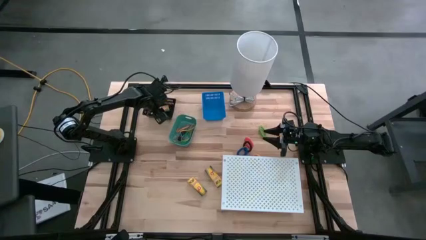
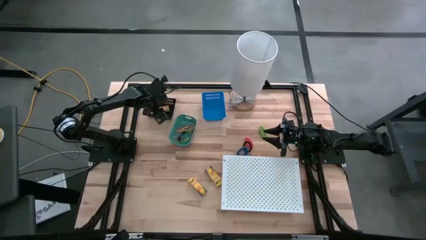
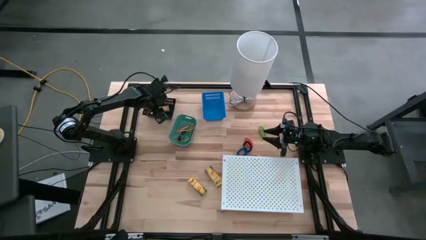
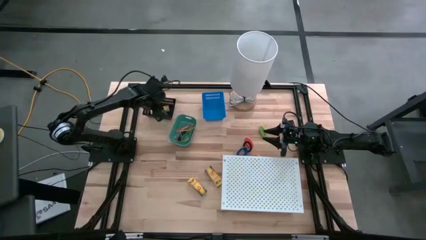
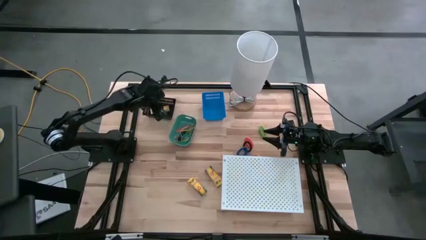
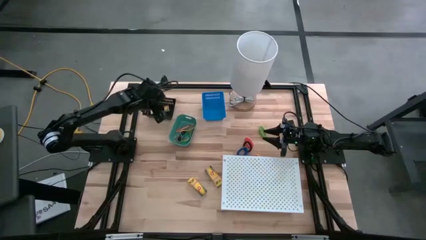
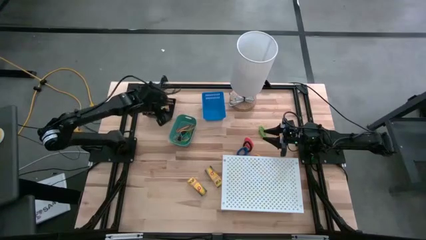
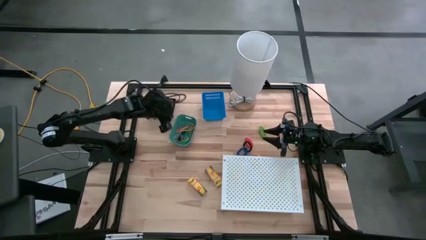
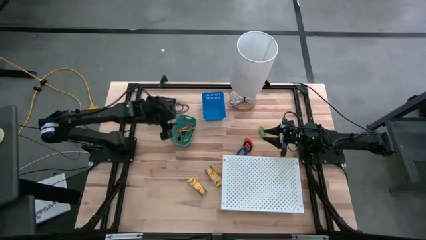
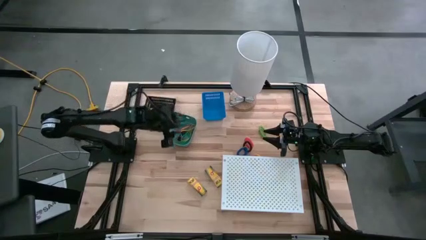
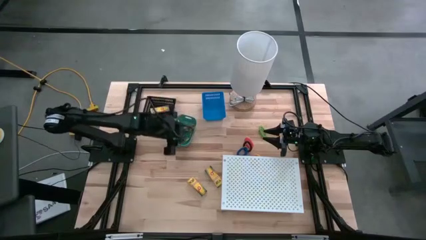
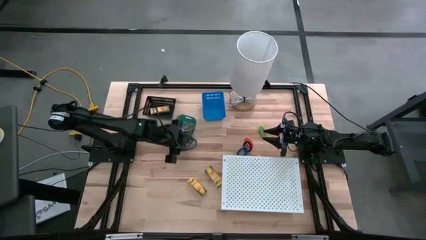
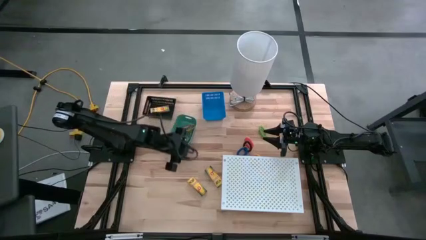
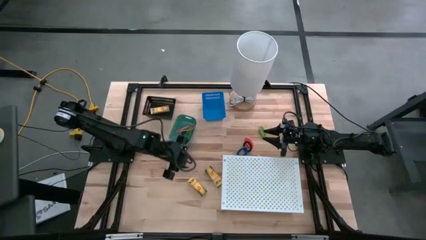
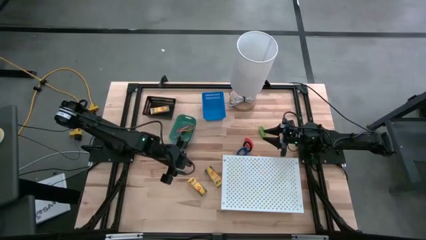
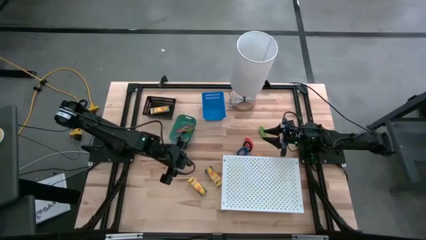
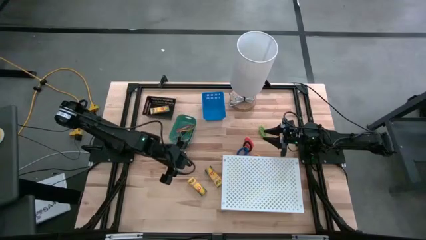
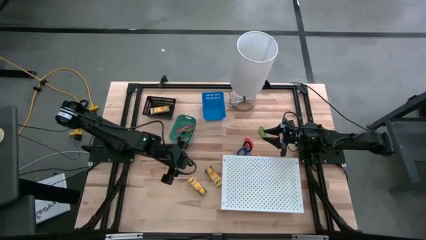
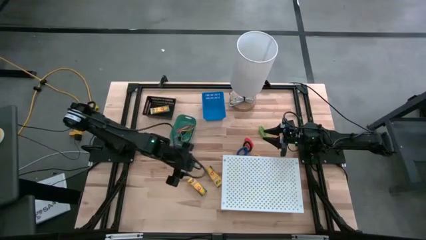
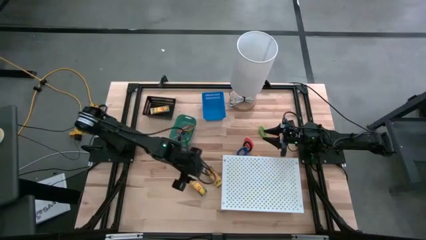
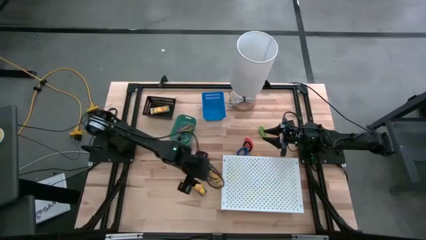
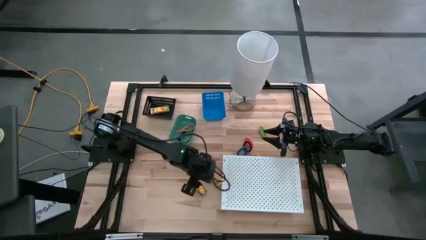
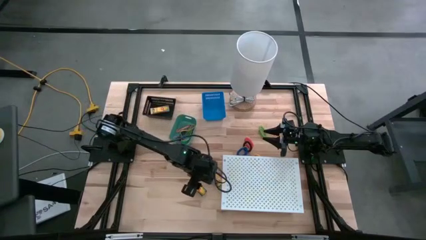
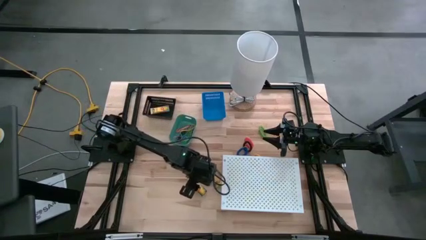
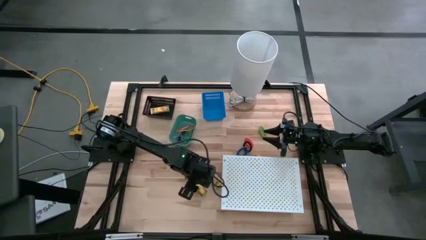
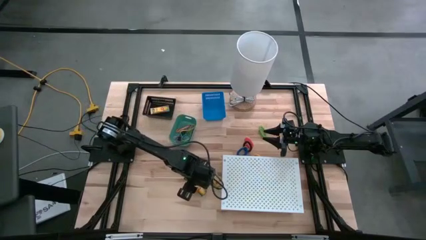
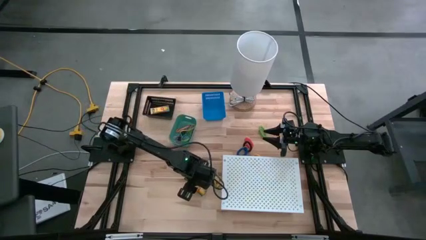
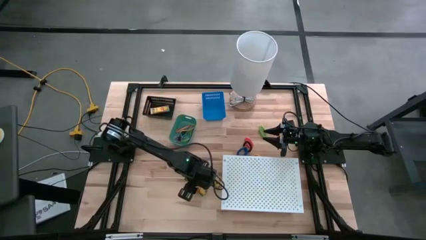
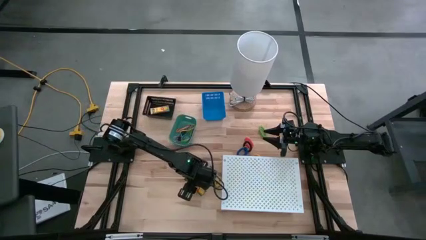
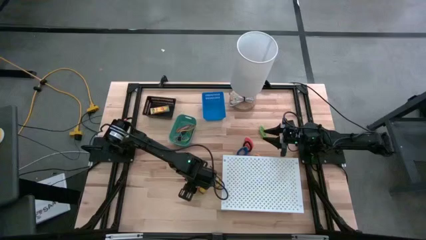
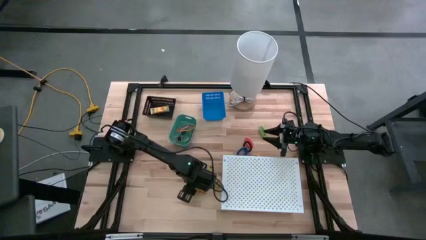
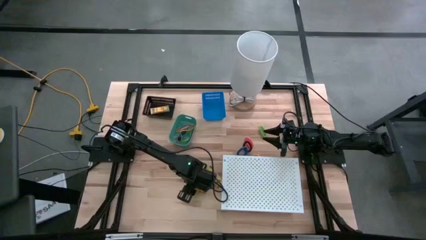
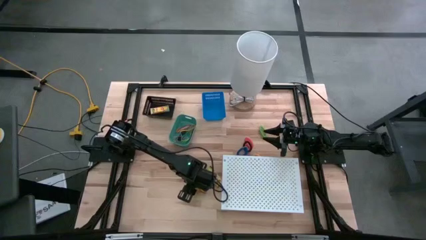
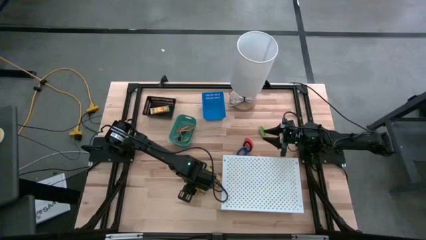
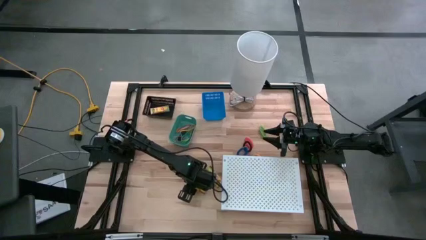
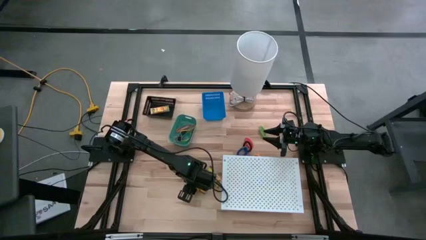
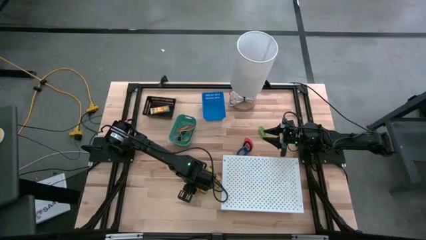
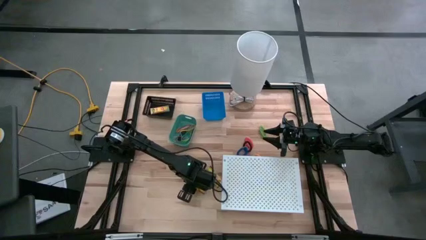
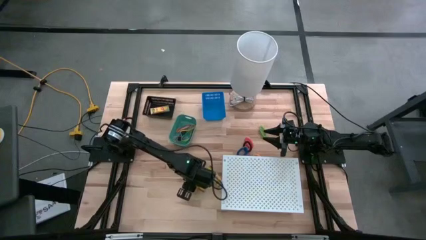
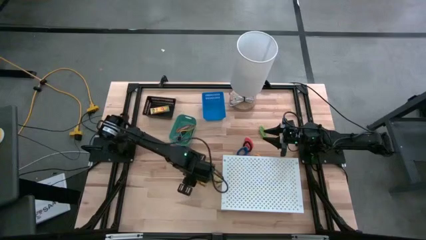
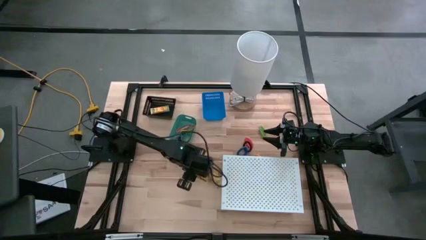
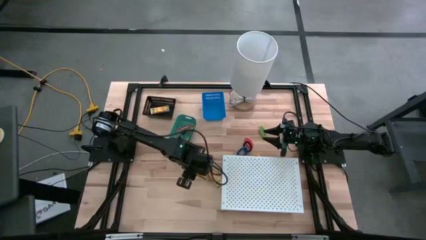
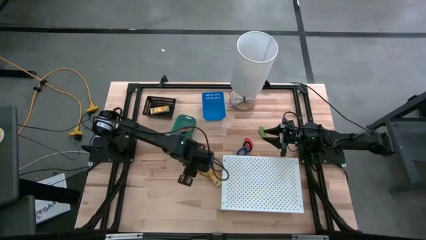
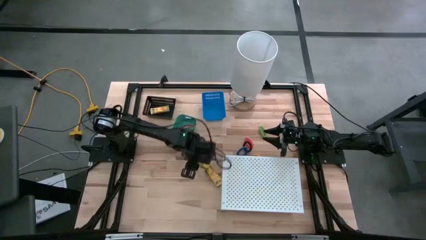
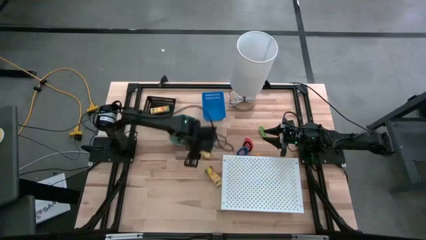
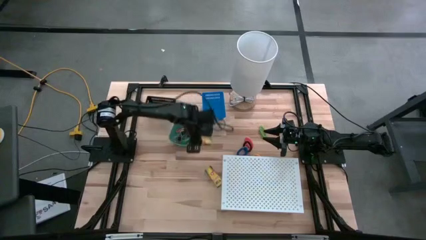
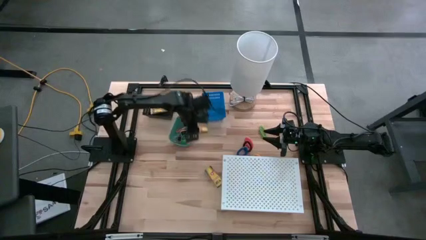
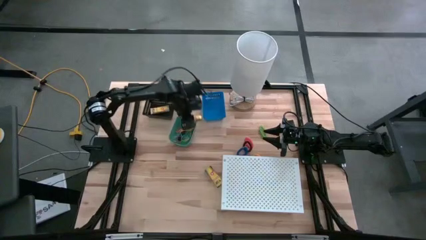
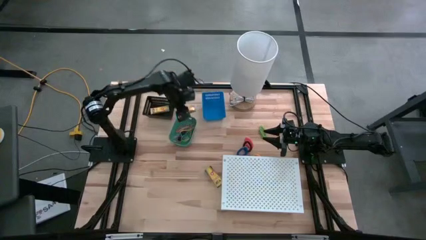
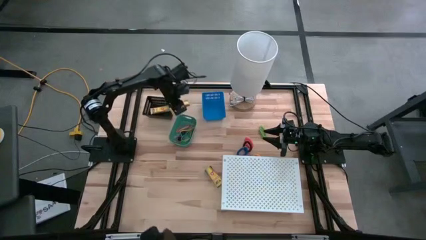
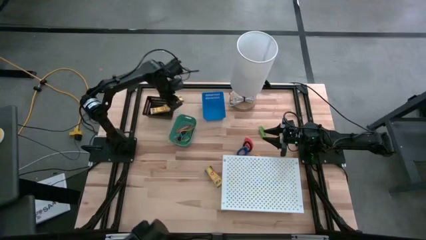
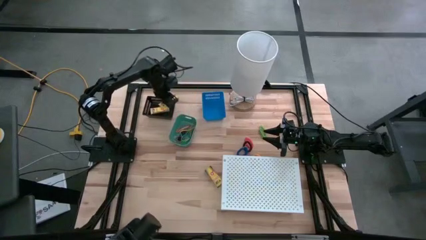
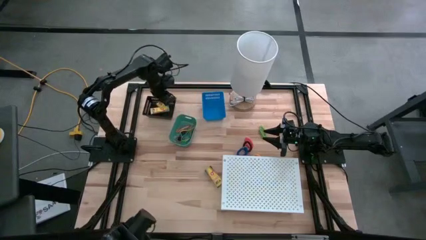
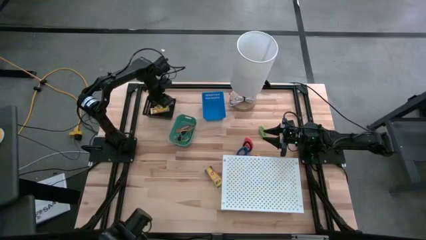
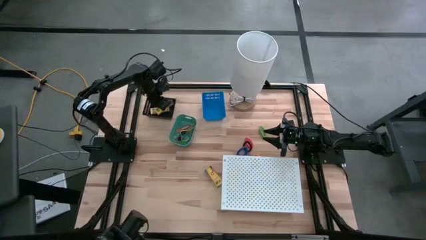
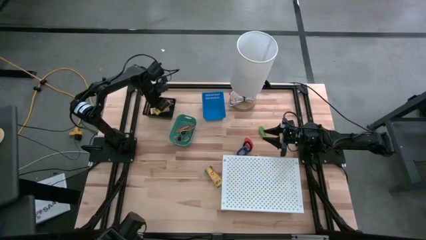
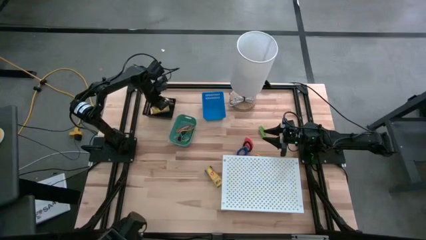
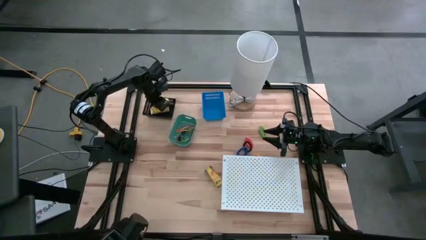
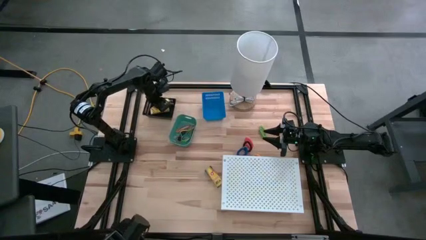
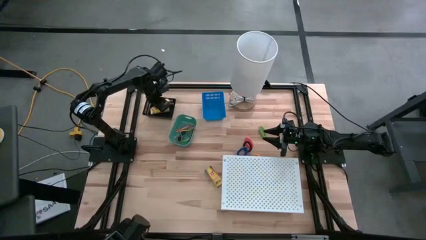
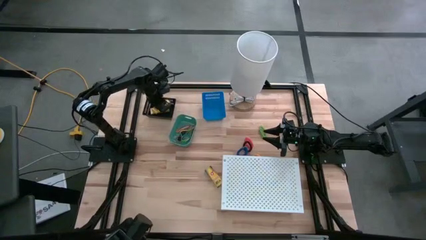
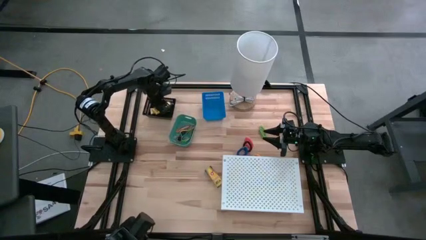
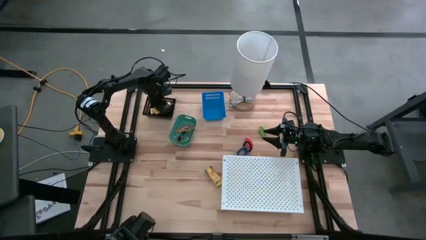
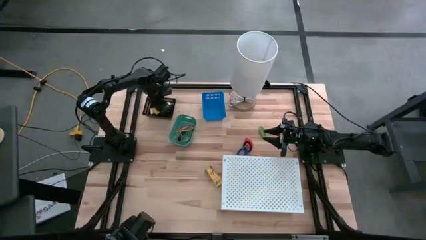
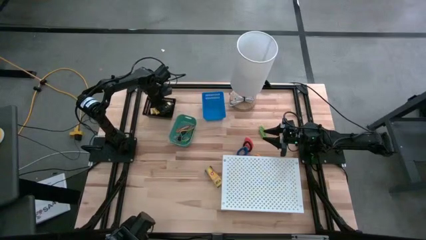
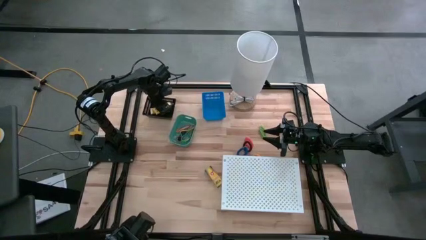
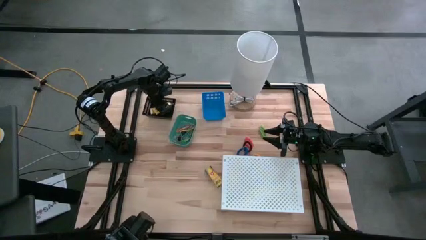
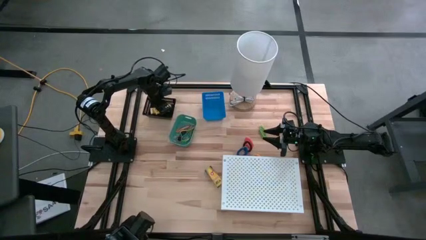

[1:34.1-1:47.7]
Task: Pick & Place Office Desk Supplies
Put the left yellow crayon box into the black bin

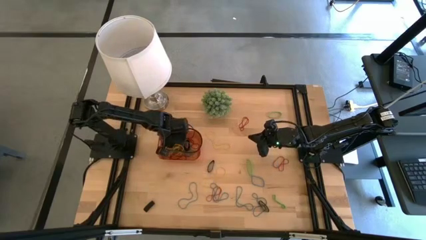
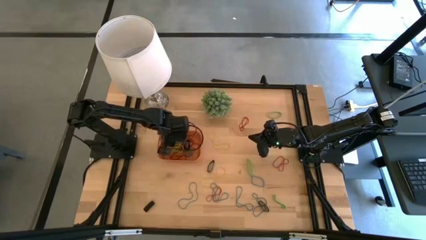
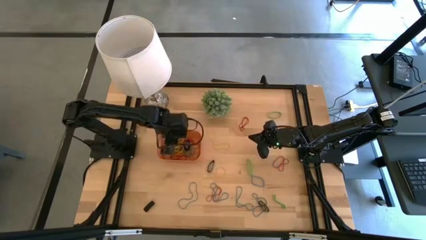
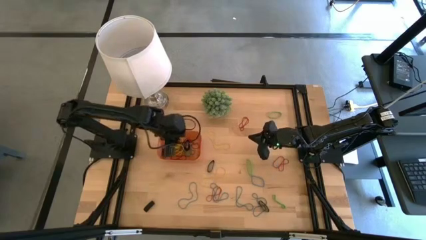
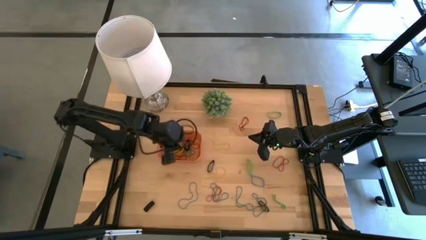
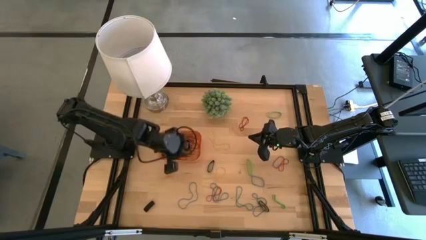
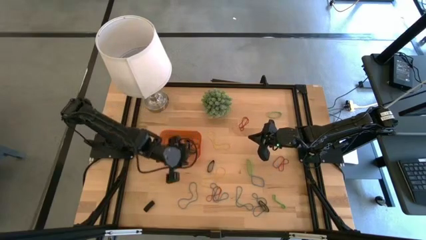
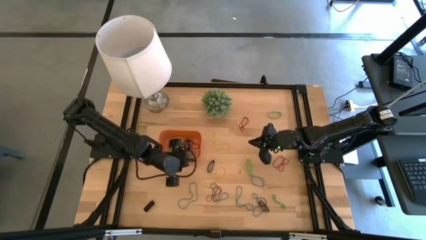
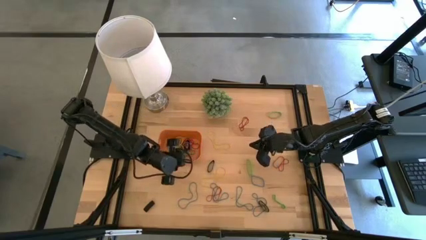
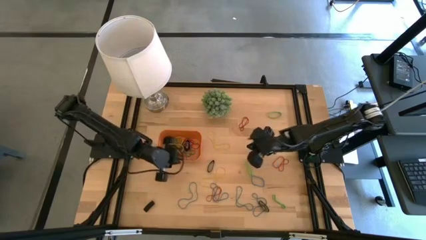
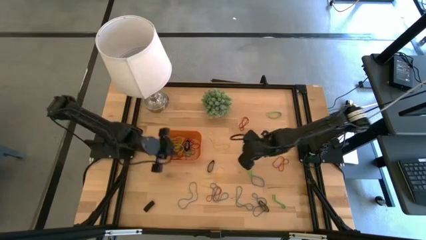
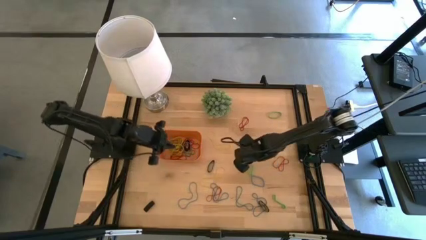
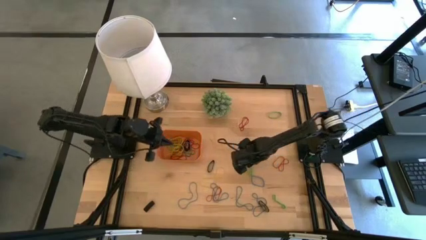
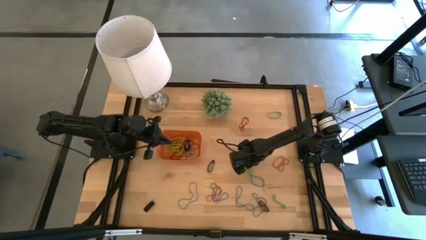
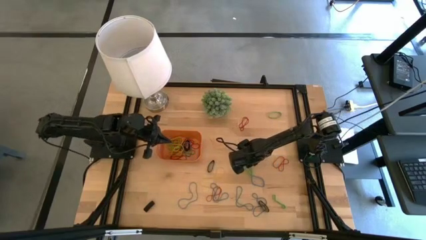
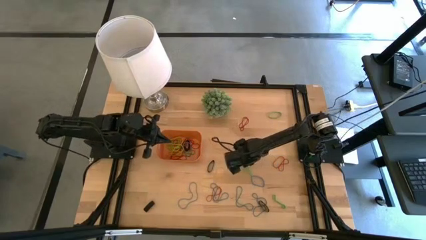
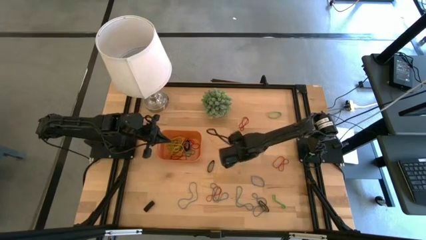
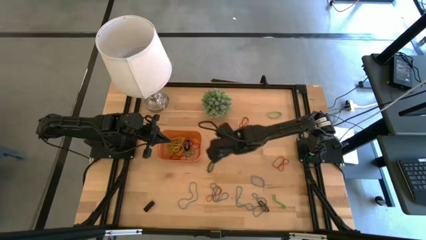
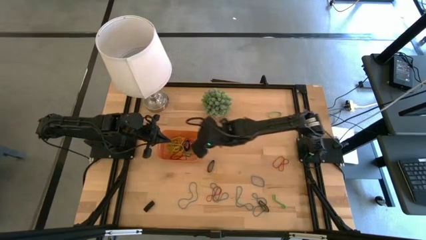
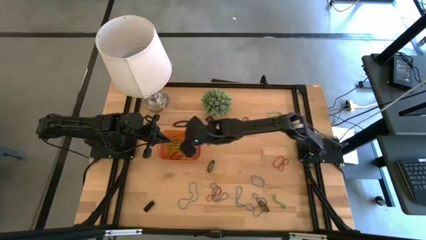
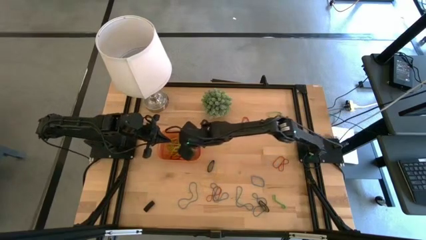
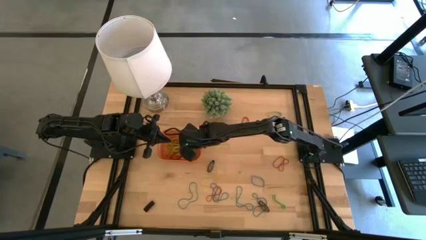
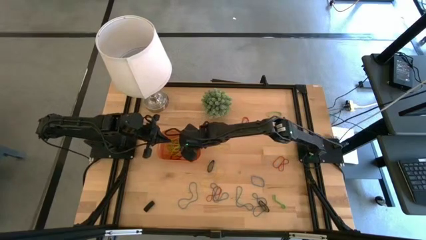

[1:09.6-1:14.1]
Task: Pick and place rubber bands into bin
Put the green rubber band into the orange bin
